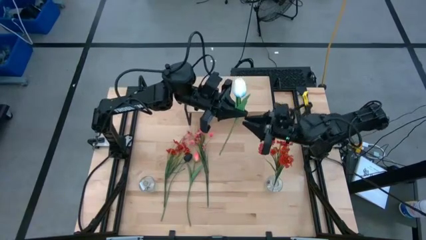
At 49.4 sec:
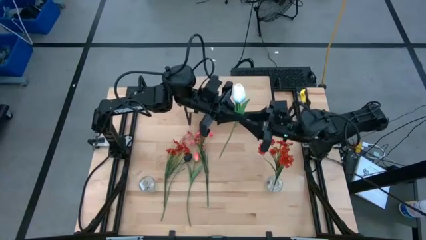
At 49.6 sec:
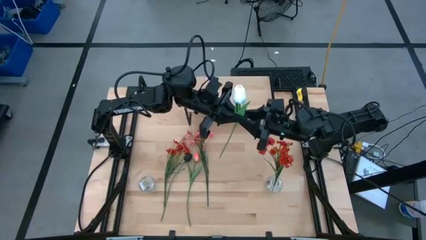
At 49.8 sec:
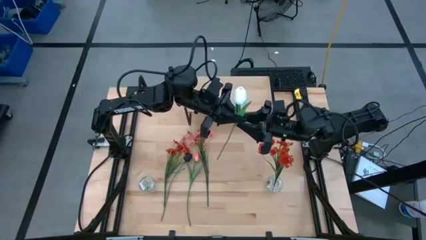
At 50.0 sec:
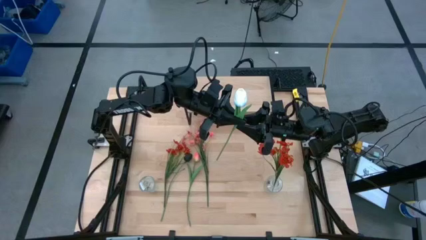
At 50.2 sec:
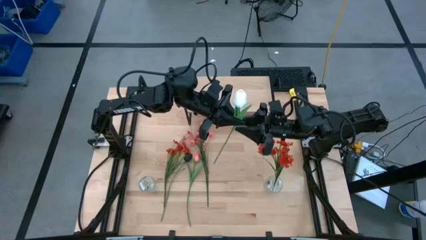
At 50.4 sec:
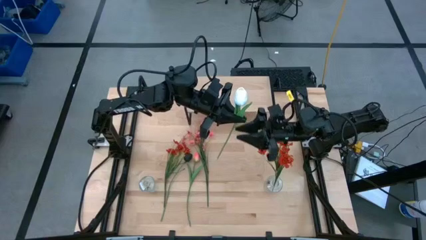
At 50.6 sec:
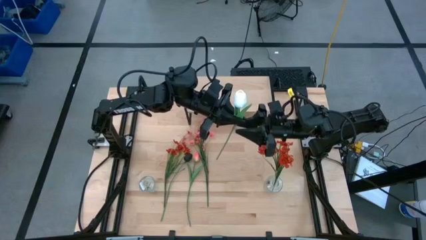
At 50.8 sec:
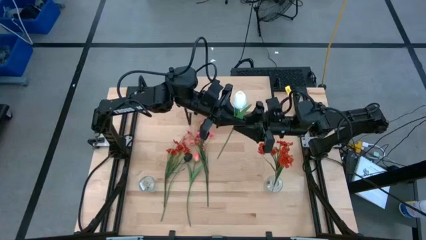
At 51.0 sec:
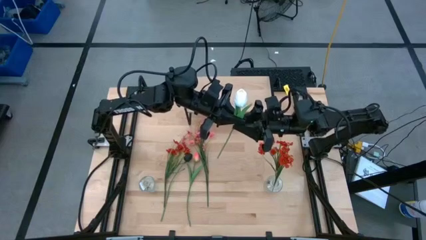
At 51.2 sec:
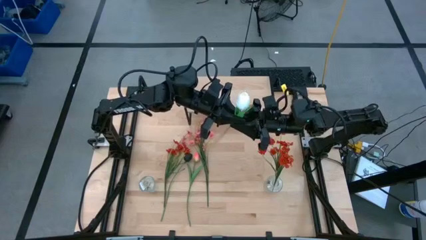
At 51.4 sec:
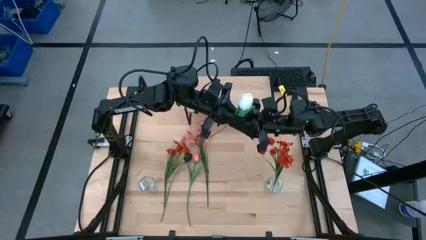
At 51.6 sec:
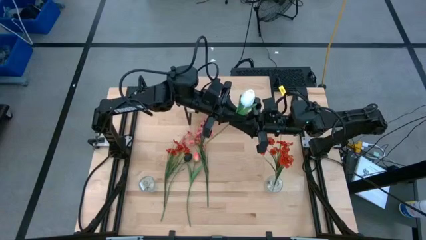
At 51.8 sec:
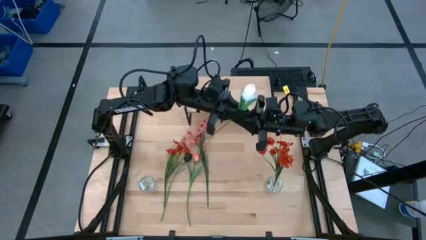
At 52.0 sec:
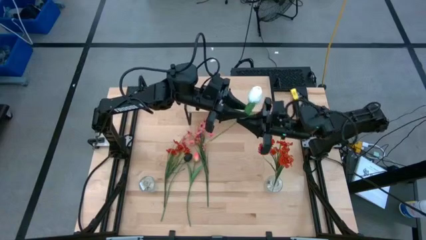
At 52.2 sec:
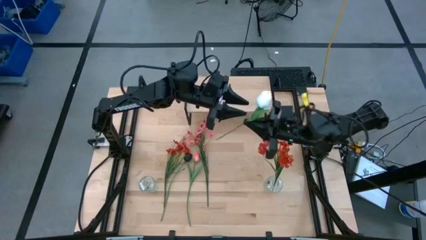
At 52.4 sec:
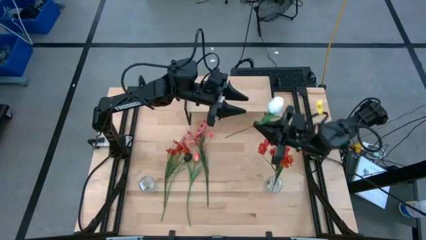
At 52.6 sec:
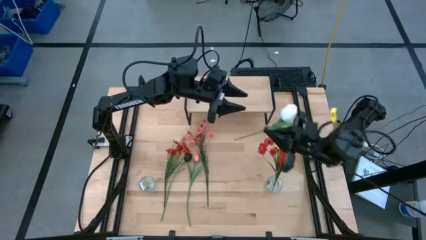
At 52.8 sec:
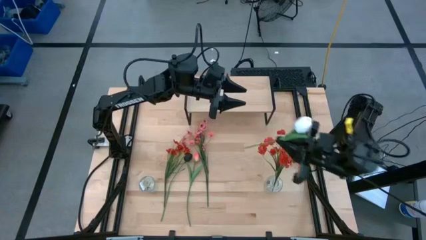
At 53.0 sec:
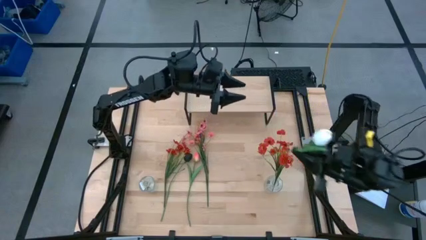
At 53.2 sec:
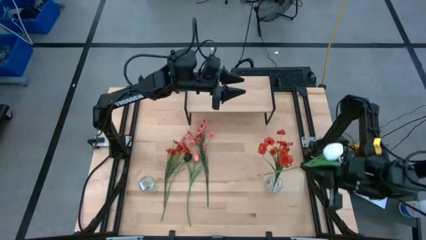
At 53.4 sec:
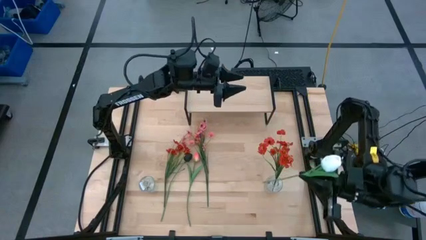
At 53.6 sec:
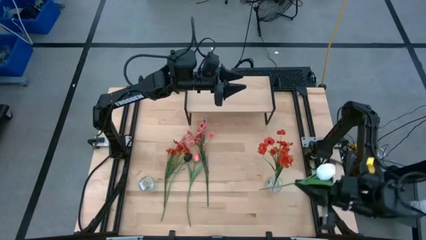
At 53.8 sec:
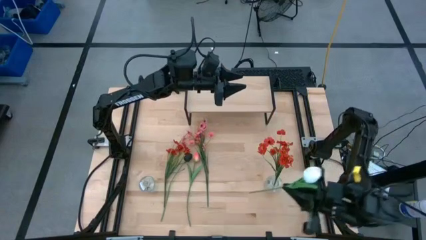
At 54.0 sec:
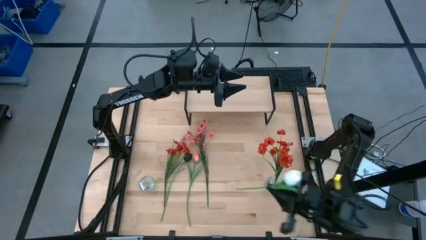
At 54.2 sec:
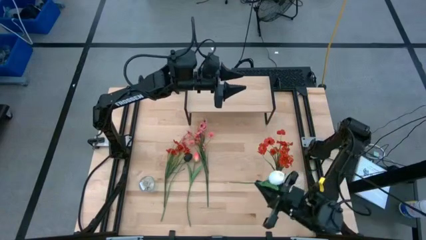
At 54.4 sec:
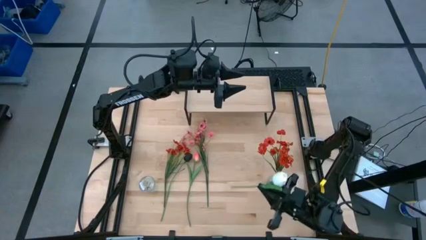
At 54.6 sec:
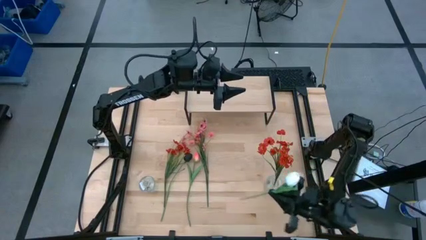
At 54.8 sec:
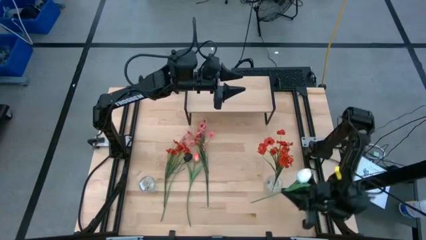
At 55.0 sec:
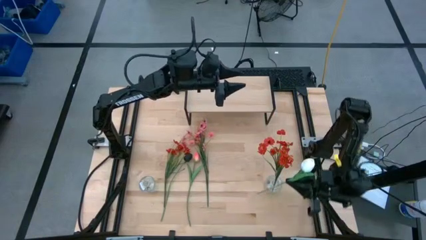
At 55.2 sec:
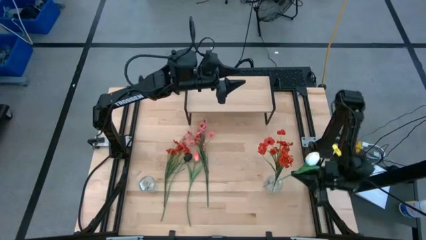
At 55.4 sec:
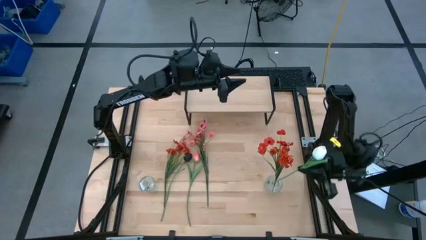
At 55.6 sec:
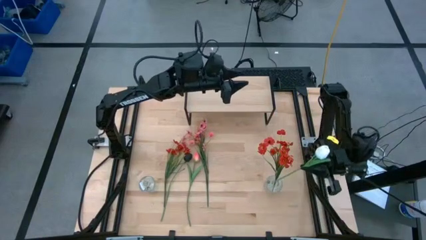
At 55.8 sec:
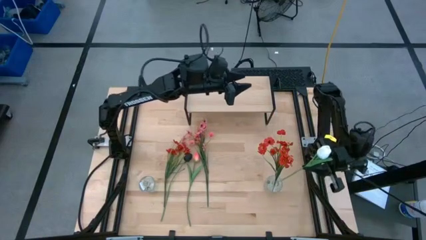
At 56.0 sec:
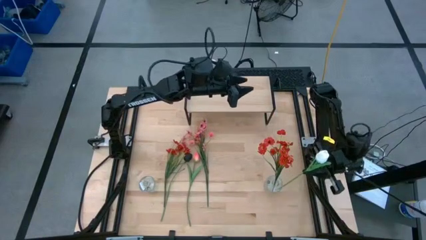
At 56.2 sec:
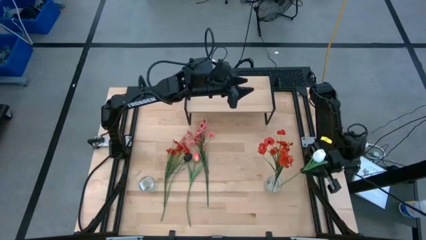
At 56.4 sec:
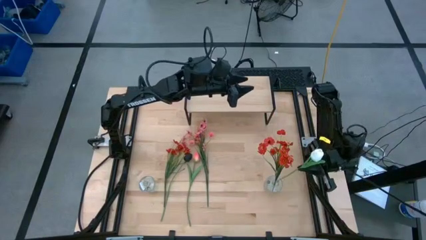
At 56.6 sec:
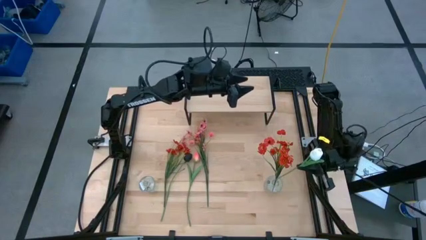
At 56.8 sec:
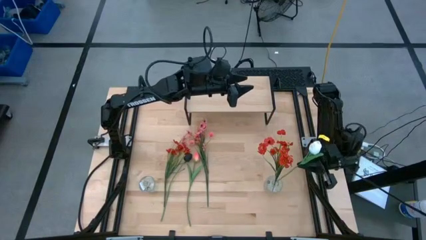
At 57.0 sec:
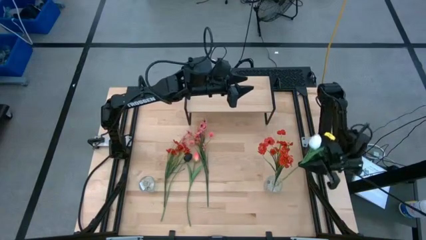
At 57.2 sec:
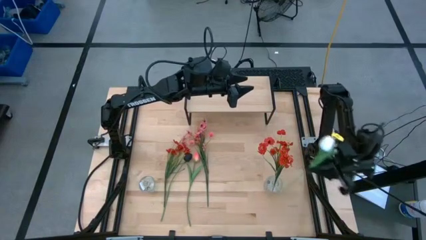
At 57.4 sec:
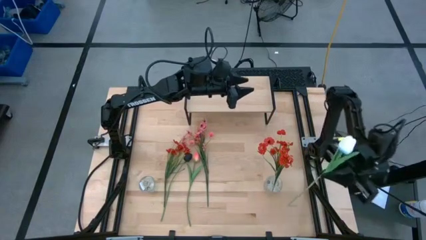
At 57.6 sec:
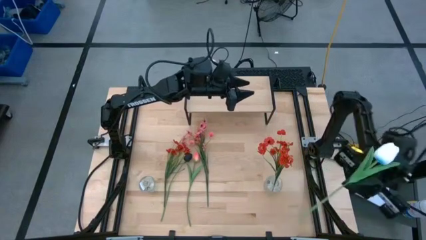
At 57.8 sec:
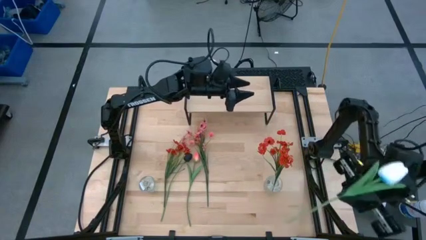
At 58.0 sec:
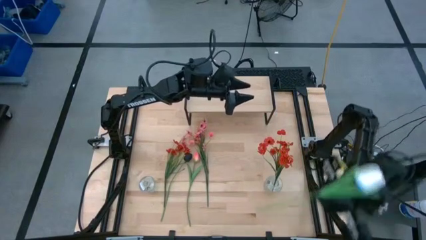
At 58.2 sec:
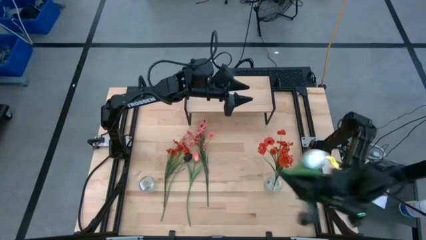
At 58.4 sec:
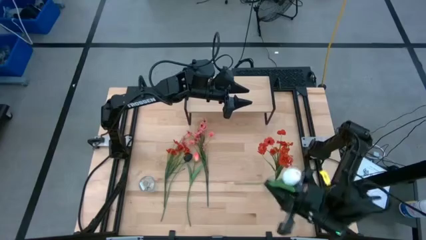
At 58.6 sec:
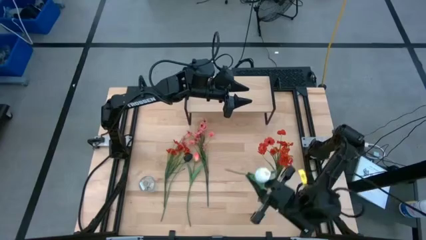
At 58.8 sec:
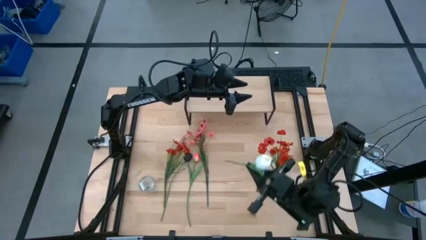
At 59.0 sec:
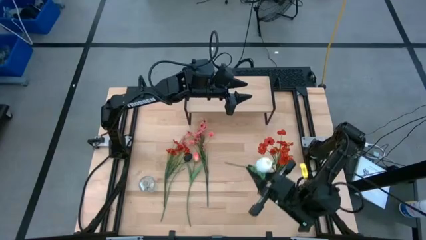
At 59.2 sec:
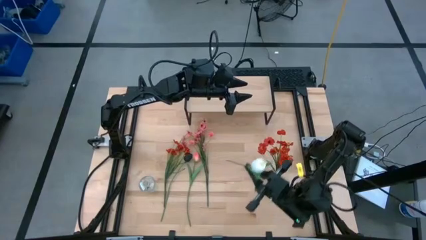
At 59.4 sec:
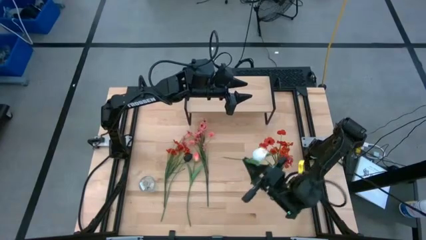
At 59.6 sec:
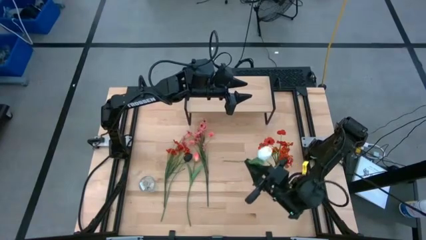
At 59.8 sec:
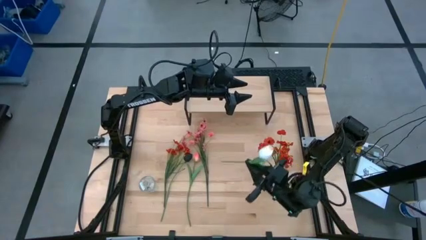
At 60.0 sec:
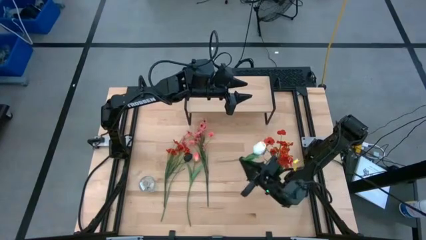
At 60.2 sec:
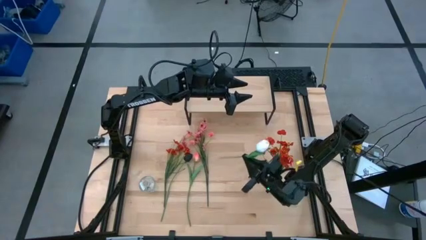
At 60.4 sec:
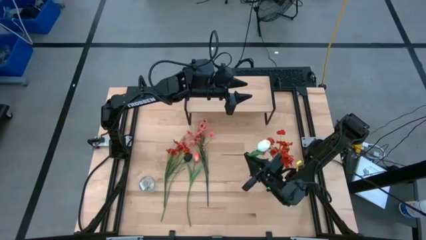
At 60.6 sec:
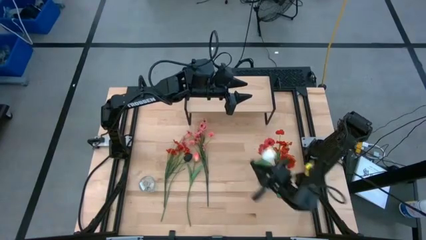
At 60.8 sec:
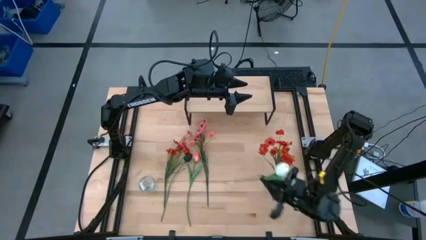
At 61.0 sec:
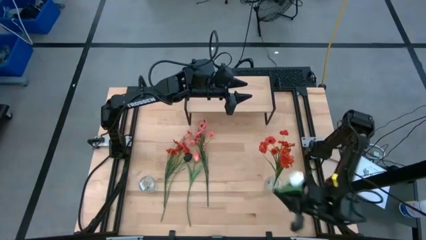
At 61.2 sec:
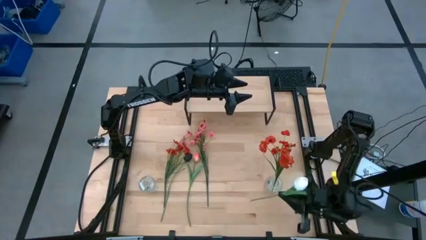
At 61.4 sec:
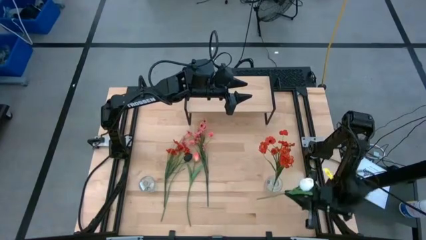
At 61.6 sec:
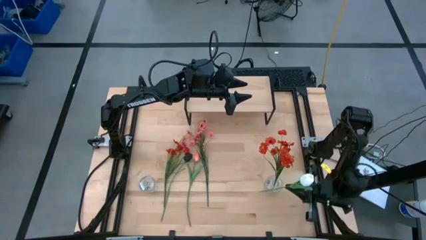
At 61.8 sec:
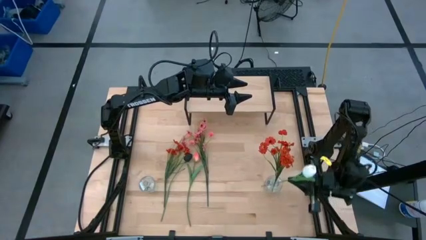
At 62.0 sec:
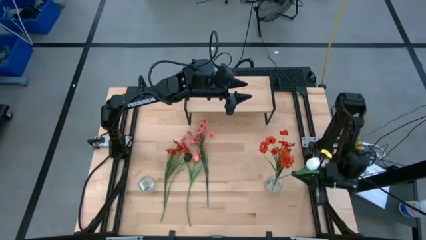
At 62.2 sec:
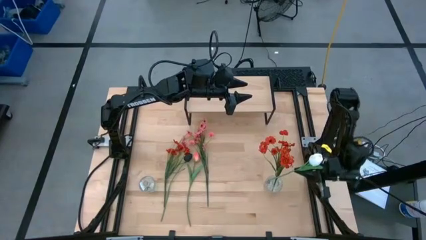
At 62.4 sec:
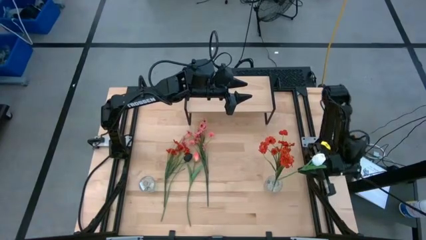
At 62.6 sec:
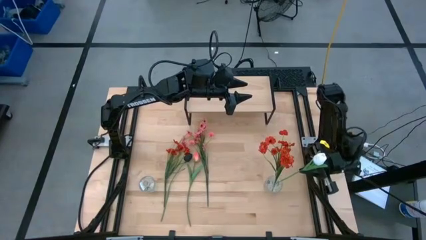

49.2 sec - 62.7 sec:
Task: Pick and place flowers into a vace then onto a shelf
Put the white flower into the right transparent vase

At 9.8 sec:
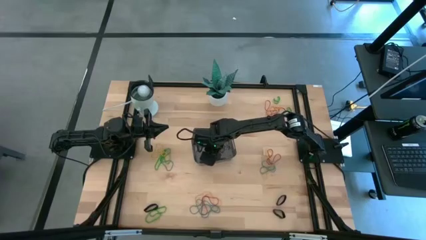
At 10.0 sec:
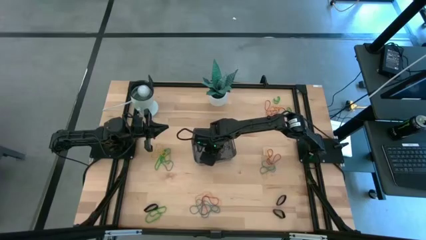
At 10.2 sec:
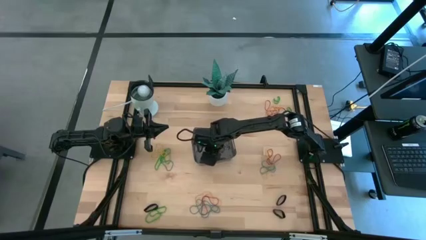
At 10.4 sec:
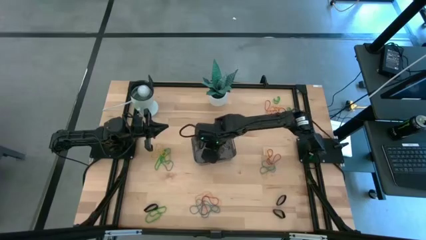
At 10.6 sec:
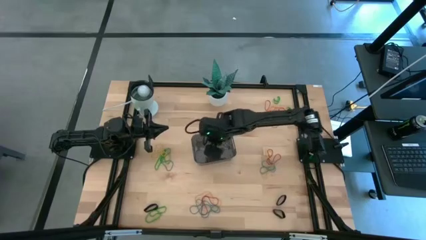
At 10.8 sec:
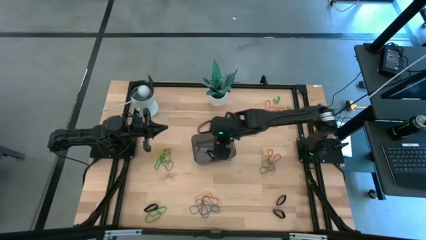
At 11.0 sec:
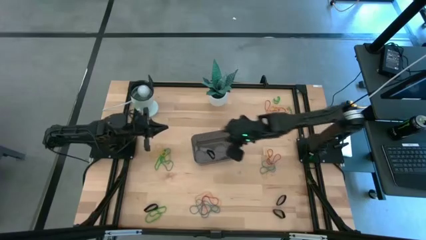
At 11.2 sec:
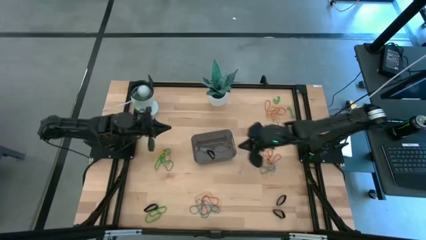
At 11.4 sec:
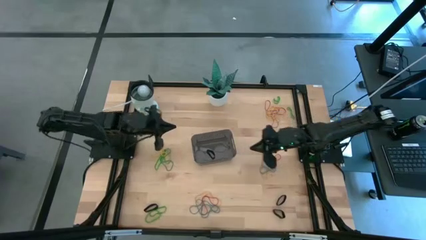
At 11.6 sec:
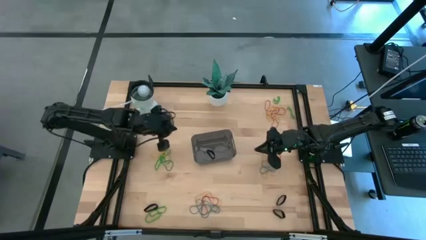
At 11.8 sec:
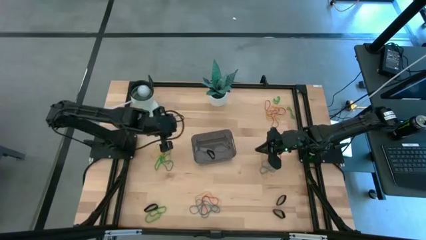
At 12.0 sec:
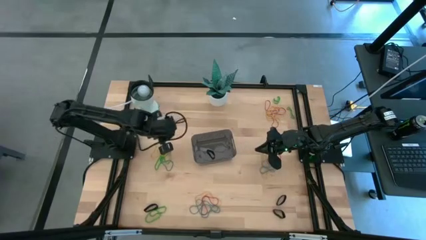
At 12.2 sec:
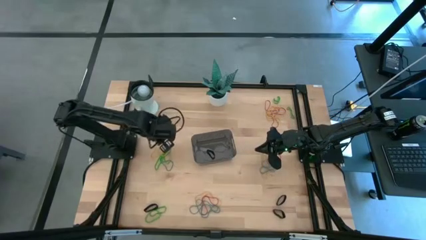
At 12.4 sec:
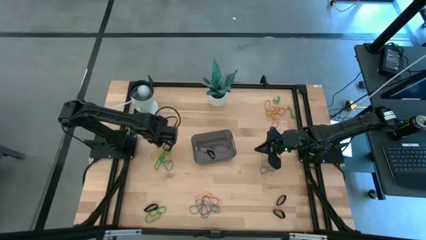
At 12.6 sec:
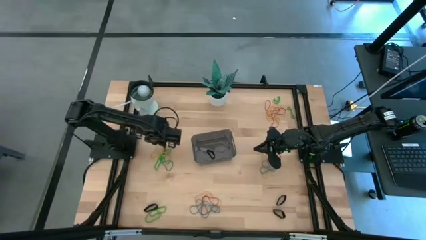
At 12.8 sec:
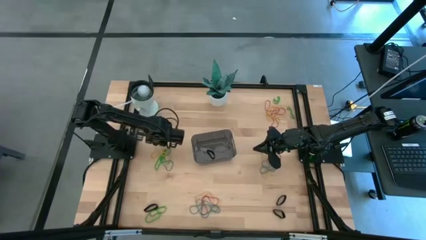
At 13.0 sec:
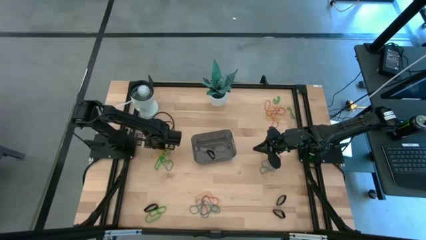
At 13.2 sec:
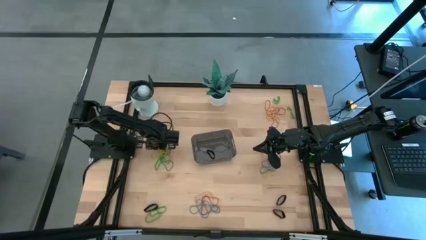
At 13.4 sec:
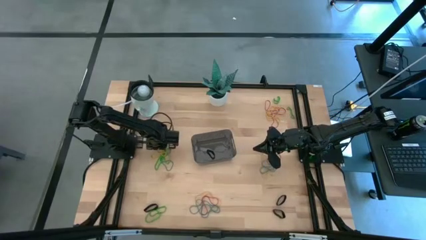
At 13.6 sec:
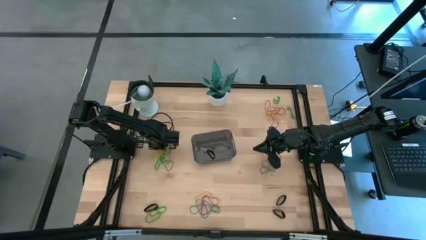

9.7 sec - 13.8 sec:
Task: Pick and place rubber bands into bin
Put the yellow rubber band into the black bin
